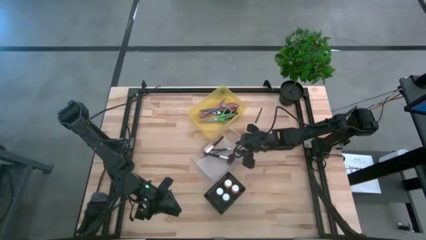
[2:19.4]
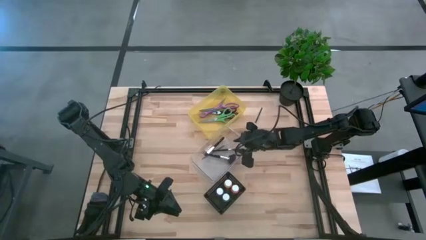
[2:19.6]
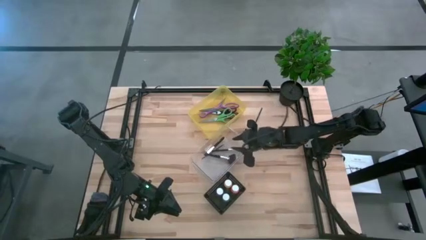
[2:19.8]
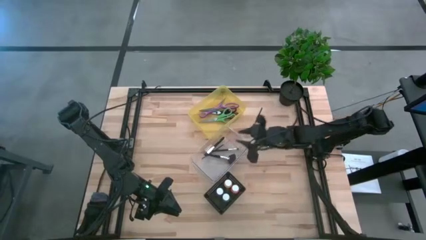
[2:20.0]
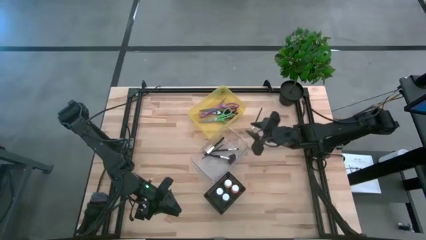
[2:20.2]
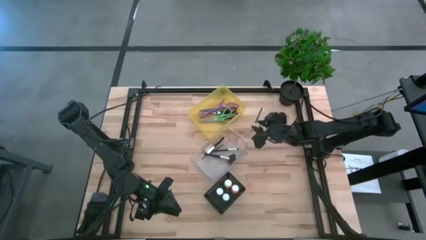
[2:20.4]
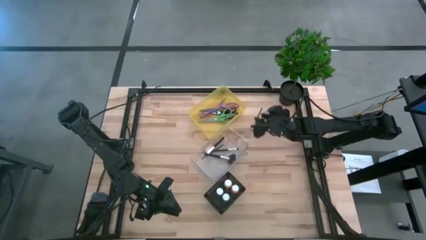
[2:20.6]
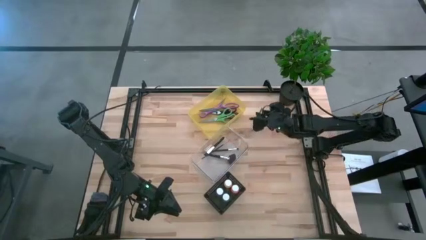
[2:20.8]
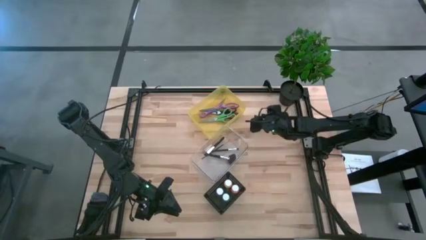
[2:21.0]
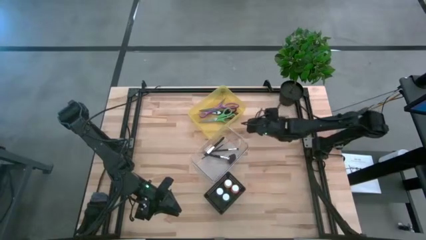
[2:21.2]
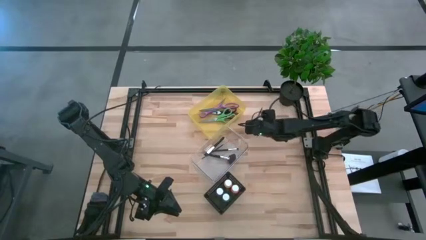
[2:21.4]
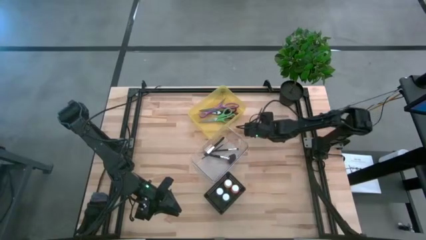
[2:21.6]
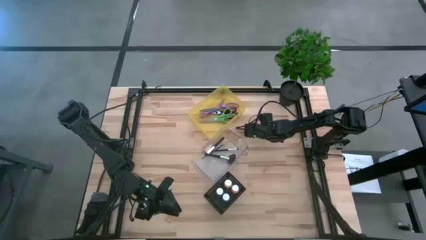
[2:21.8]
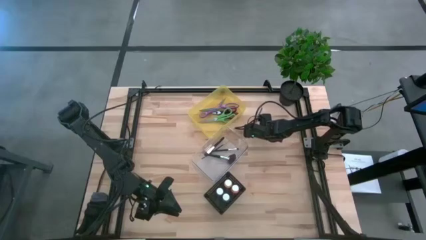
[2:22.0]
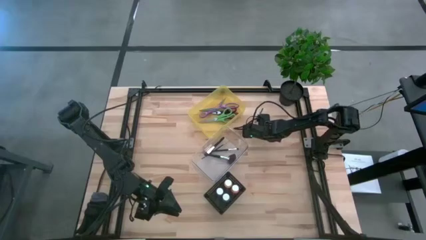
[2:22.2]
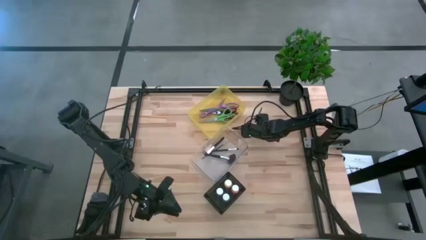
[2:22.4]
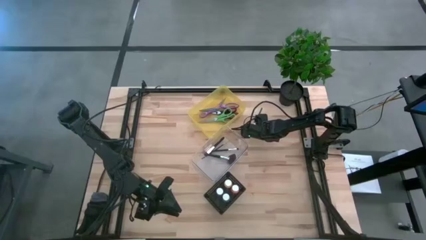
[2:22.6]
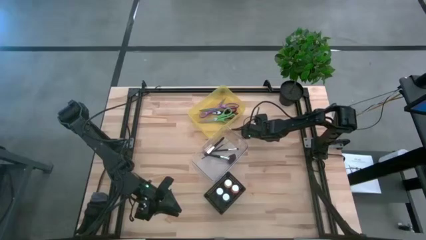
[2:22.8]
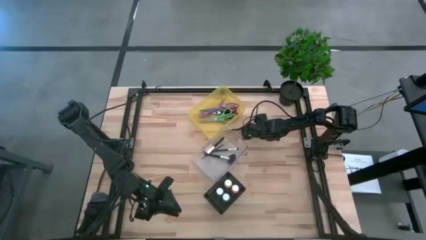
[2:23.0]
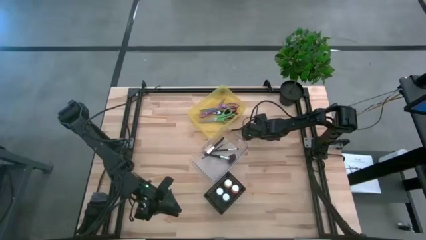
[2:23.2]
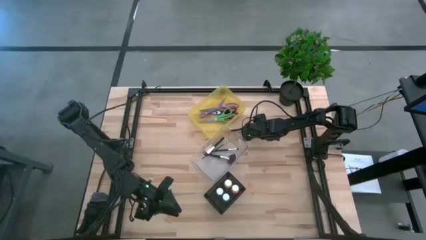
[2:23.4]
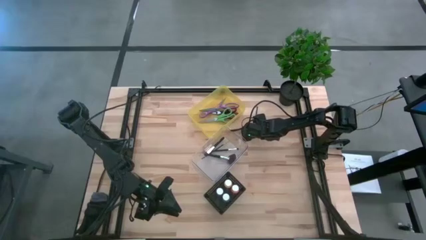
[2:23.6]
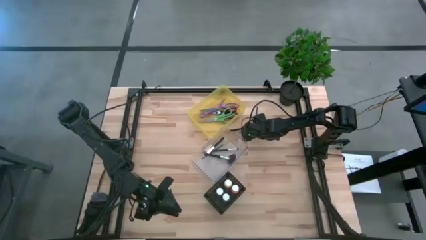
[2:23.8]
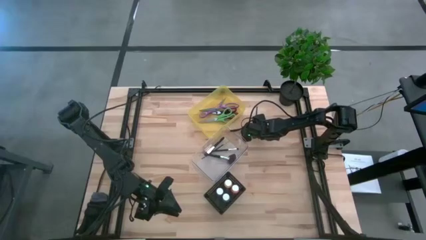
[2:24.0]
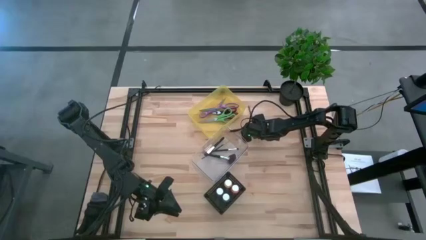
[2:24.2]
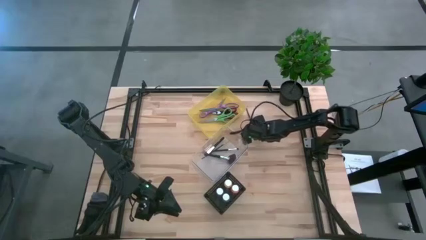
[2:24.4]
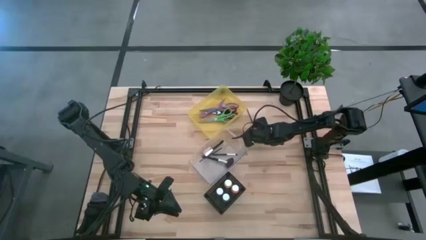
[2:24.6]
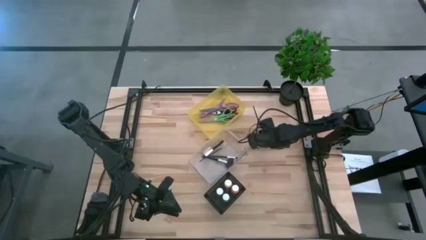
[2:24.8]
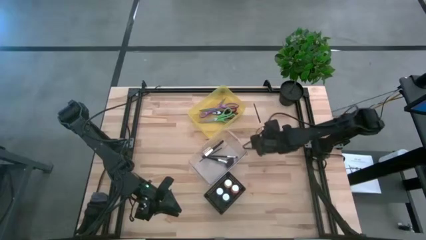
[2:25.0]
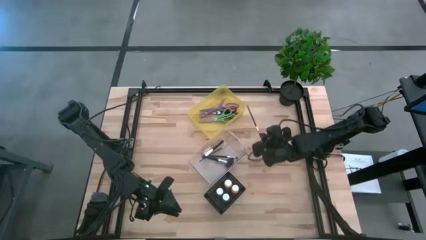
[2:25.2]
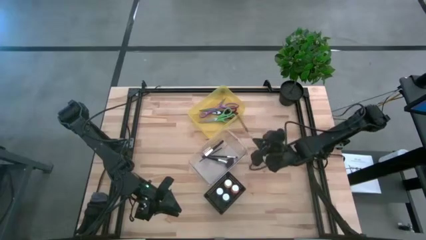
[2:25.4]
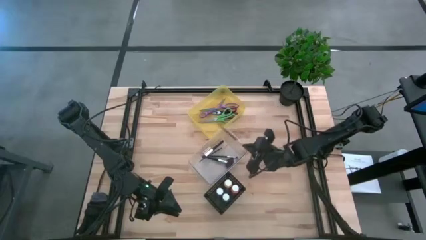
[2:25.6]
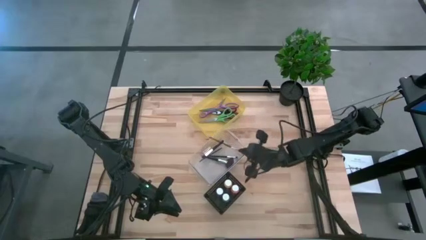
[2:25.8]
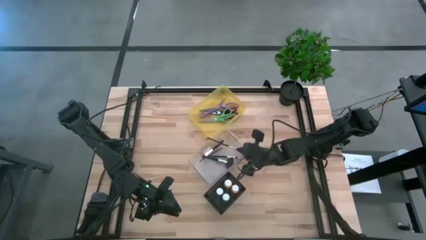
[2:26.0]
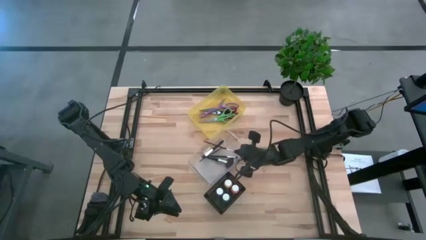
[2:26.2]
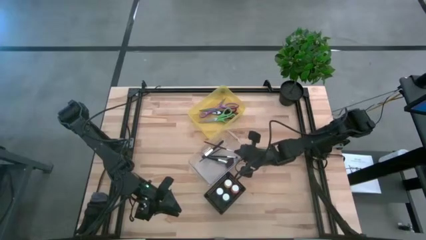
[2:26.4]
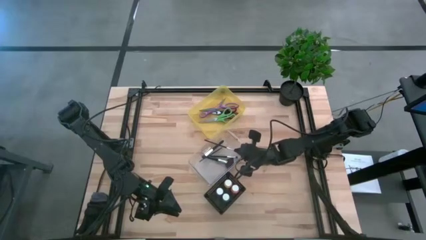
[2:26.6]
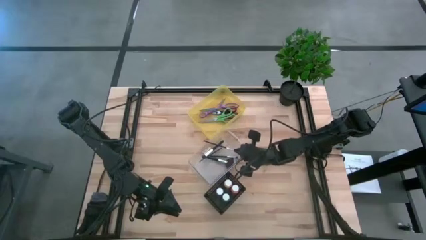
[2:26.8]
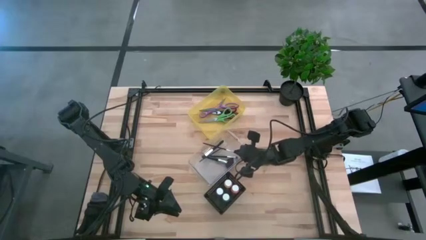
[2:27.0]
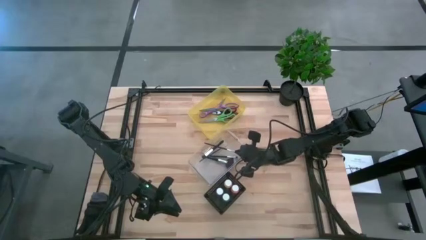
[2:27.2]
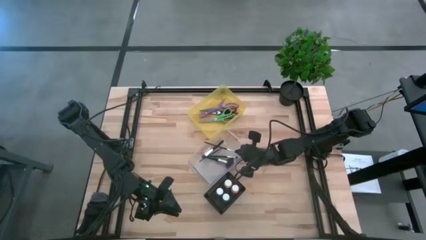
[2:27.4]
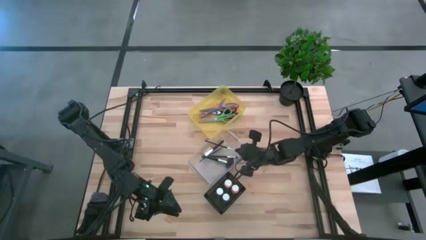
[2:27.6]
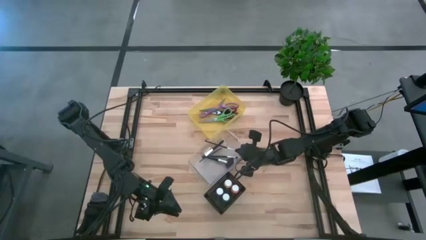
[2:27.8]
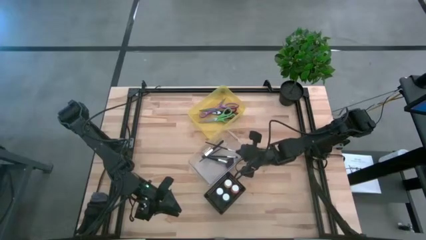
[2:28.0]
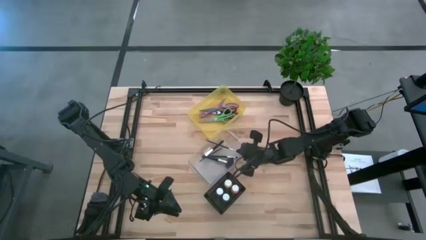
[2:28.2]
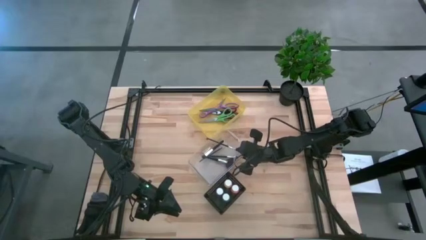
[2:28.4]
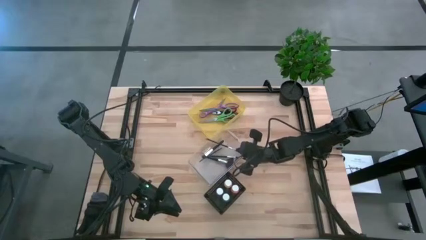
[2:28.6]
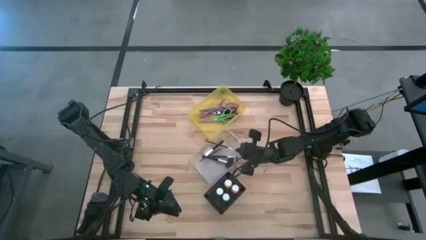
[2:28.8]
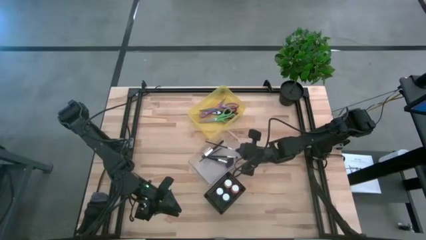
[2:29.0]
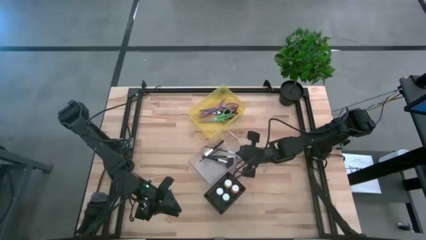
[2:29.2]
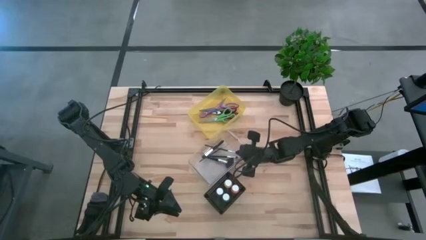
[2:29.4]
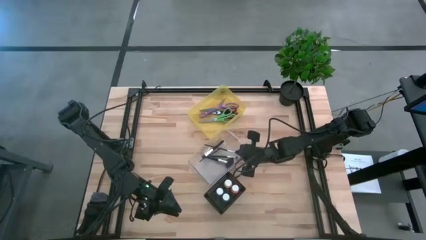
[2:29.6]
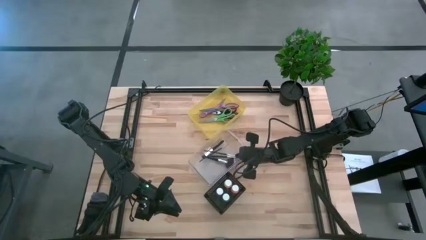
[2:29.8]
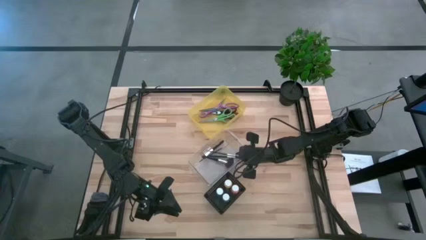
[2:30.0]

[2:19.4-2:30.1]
Task: Pick & Place Paint Supplies
Put the eyeshadow brush into the transparent bin

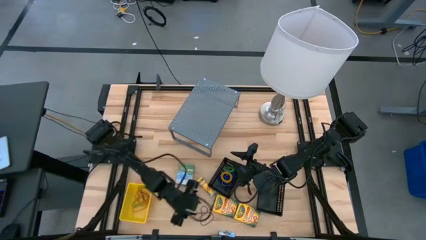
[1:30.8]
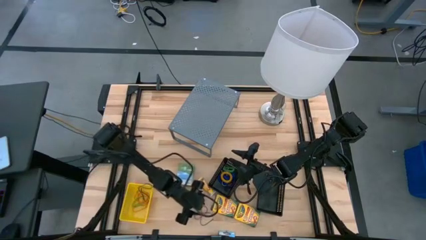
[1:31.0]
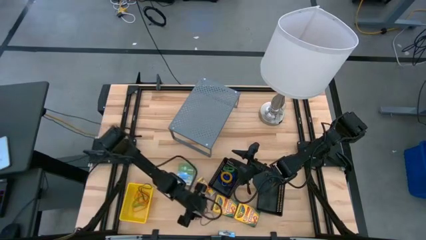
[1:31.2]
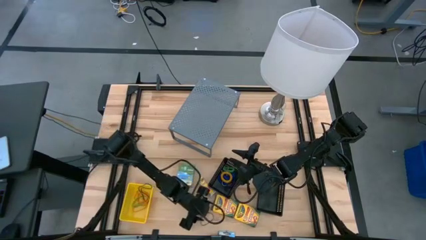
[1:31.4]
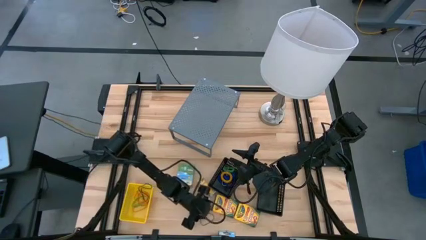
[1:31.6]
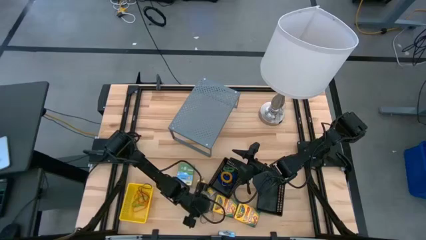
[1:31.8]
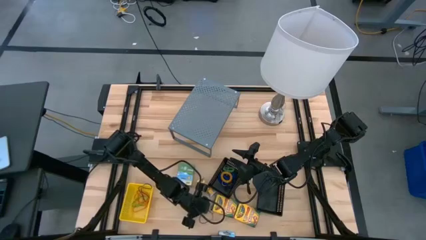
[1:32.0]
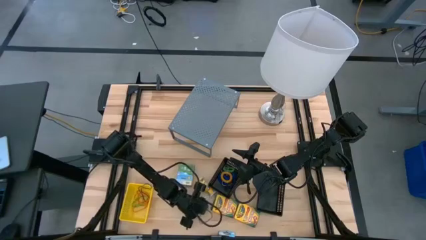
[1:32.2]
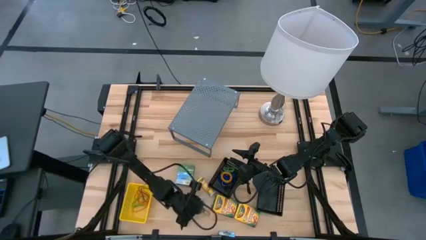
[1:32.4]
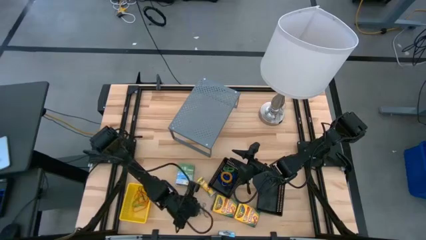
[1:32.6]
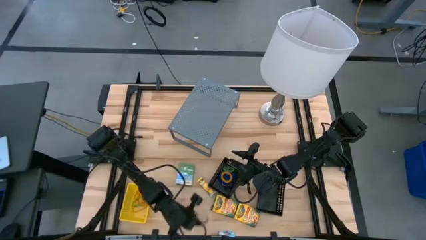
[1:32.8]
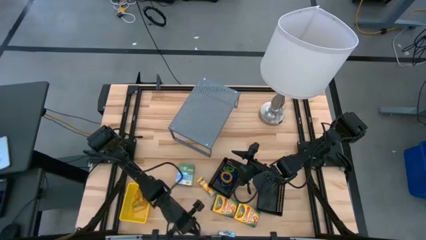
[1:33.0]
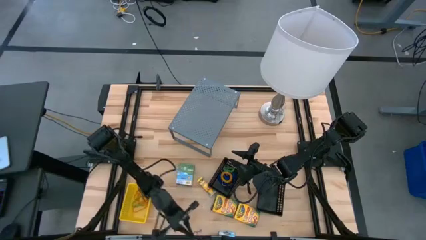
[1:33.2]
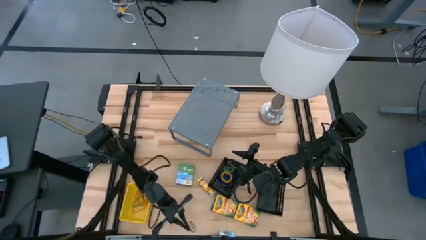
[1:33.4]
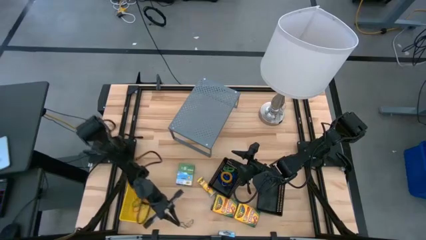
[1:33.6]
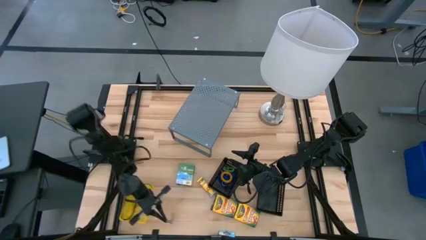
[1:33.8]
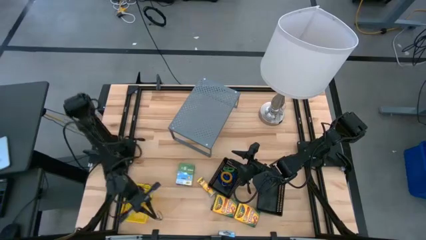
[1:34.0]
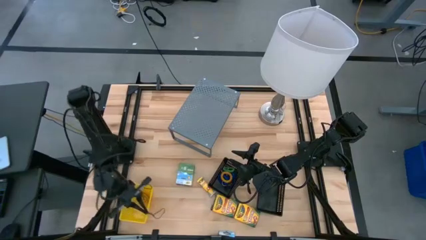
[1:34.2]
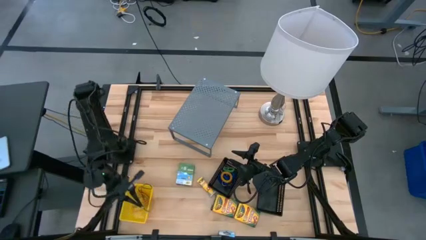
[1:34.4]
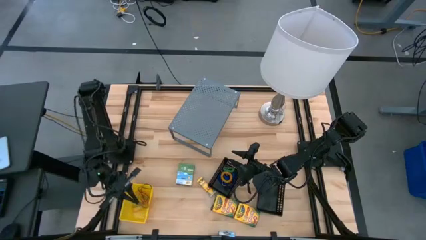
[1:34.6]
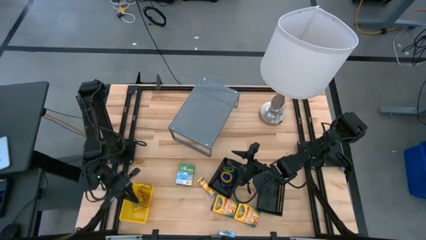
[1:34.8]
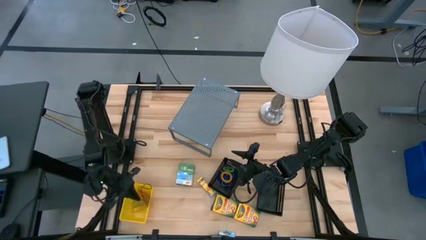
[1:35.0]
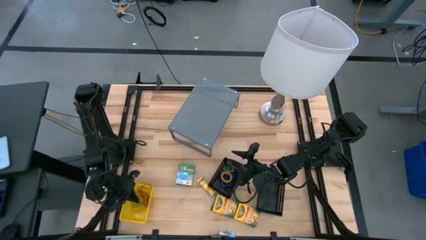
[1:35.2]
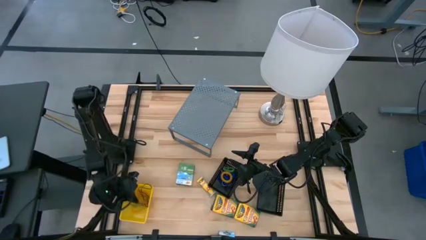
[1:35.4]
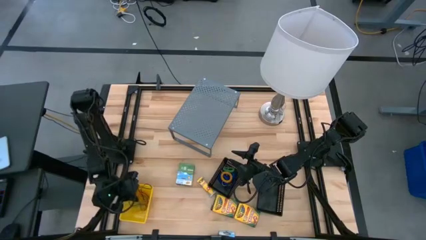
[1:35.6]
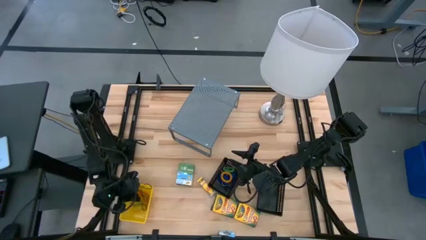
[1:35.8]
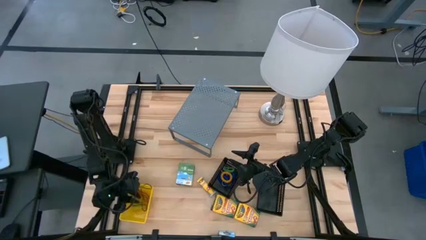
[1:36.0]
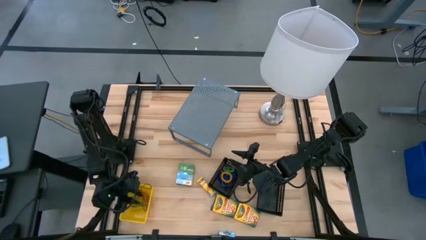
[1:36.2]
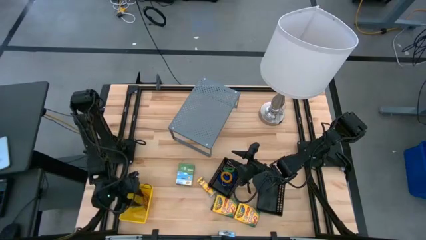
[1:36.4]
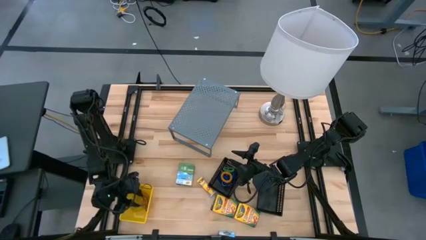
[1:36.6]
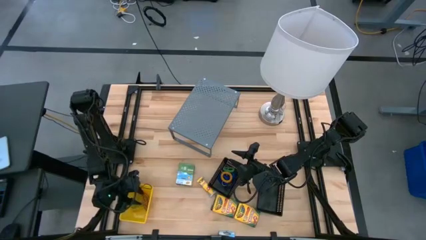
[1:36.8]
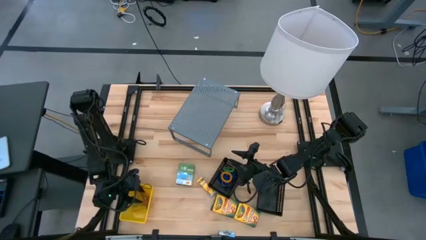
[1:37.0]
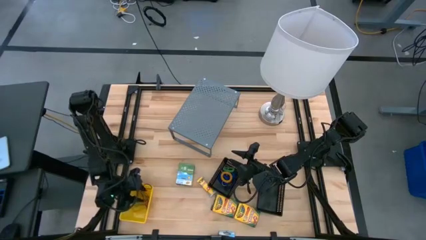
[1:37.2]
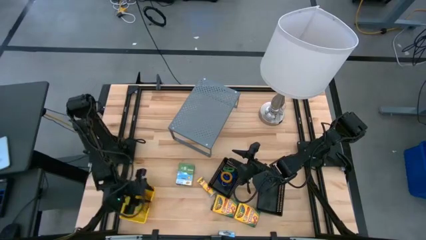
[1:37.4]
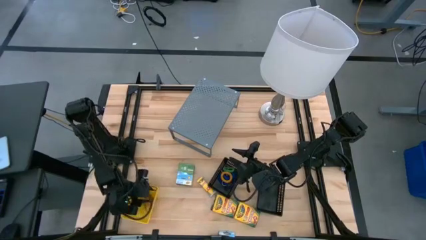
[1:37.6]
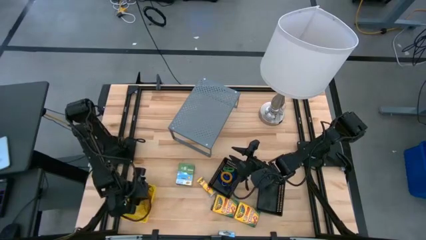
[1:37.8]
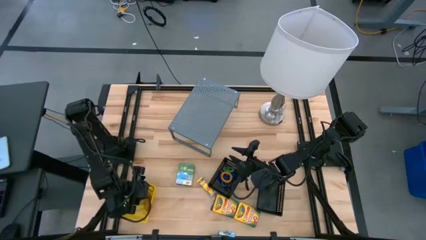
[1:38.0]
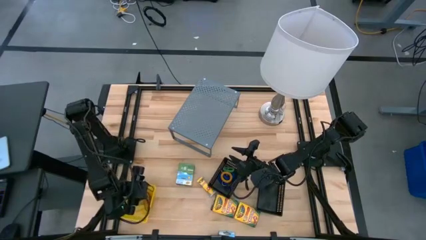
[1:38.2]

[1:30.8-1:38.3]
Task: Pick & Place Office Desk Supplies
Put the black rubber band into the yellow bin
